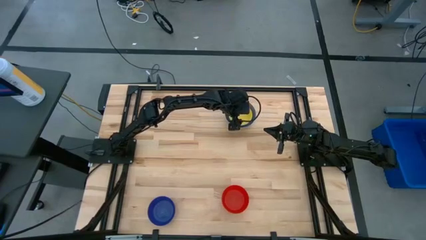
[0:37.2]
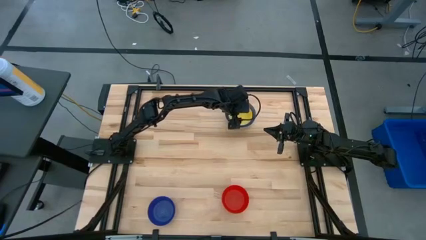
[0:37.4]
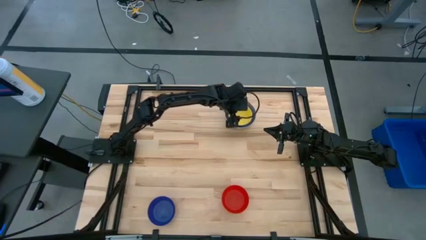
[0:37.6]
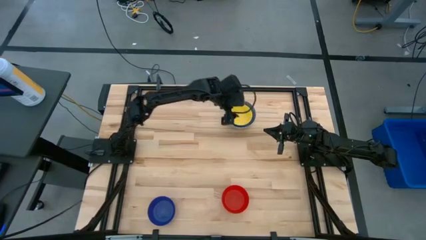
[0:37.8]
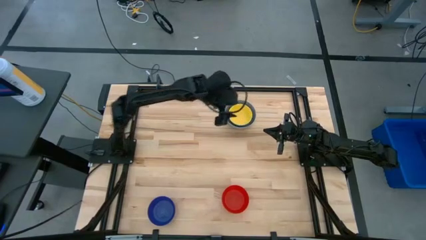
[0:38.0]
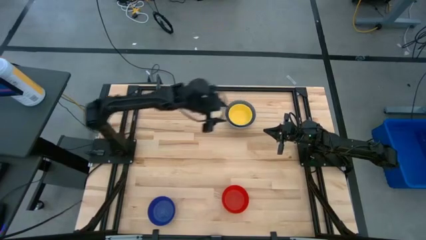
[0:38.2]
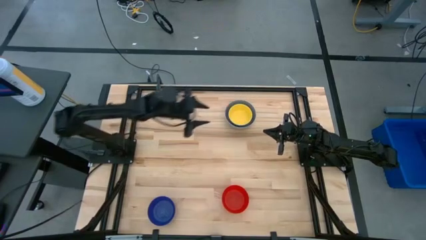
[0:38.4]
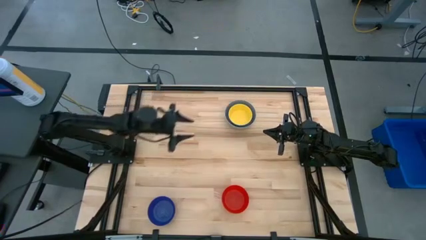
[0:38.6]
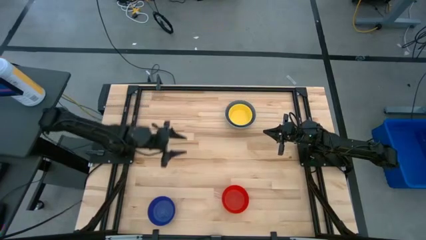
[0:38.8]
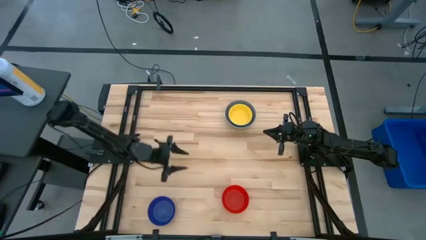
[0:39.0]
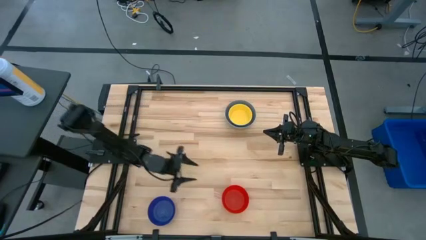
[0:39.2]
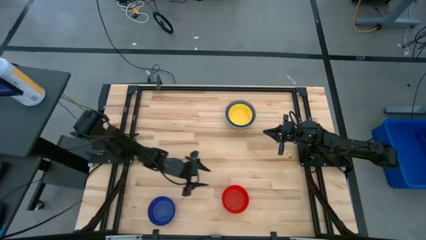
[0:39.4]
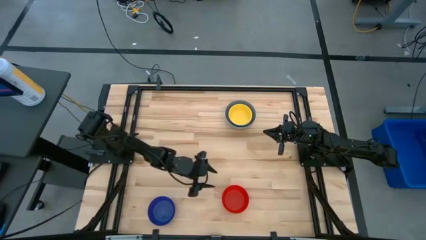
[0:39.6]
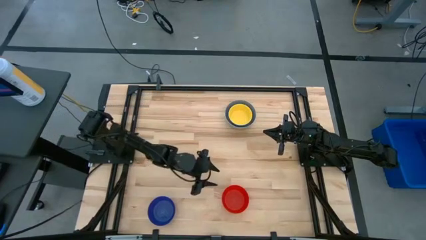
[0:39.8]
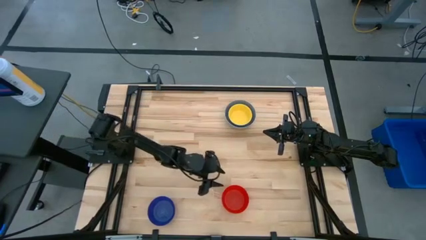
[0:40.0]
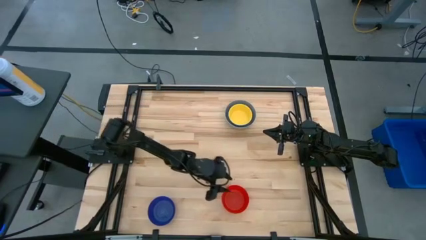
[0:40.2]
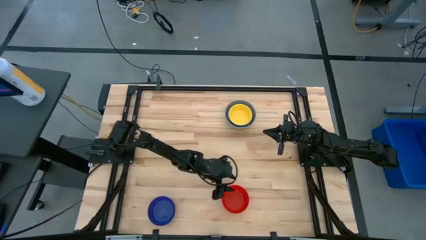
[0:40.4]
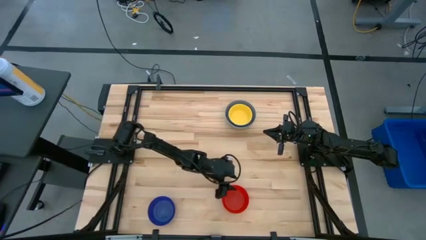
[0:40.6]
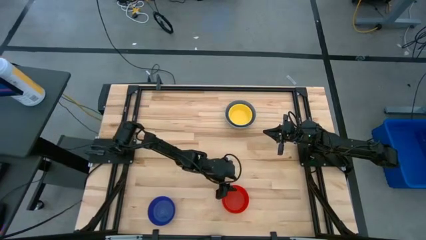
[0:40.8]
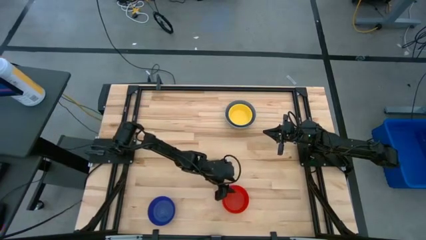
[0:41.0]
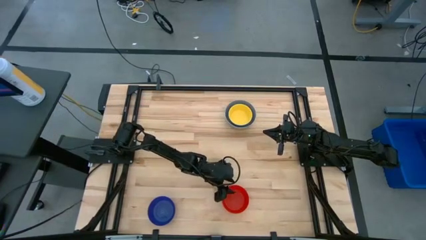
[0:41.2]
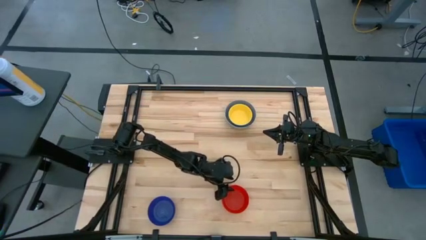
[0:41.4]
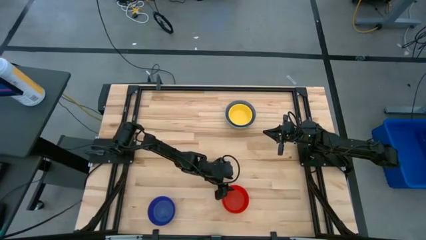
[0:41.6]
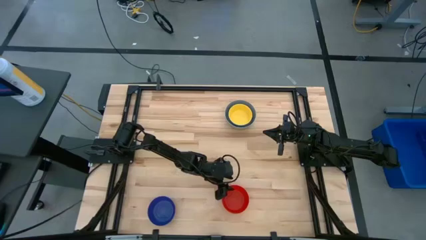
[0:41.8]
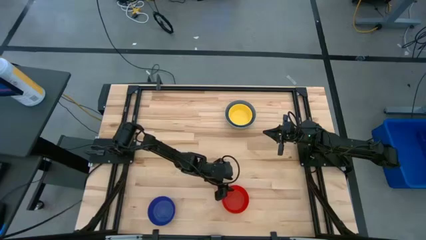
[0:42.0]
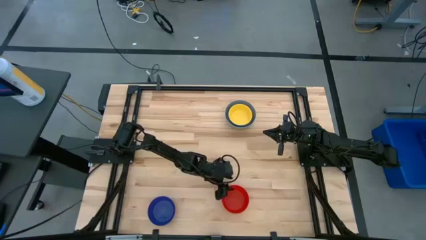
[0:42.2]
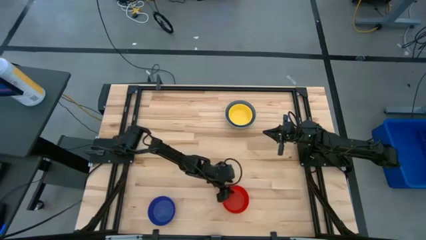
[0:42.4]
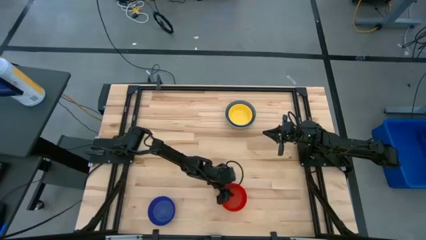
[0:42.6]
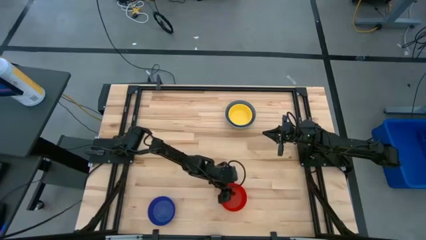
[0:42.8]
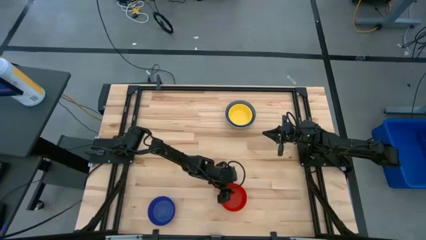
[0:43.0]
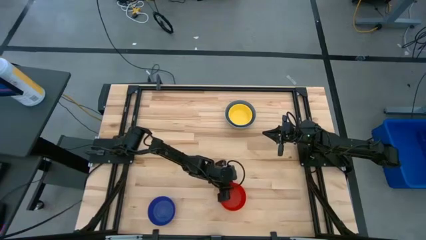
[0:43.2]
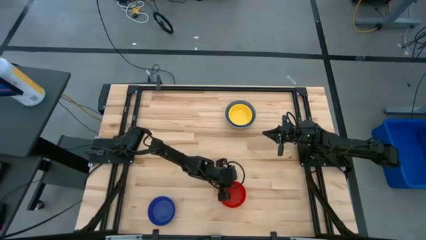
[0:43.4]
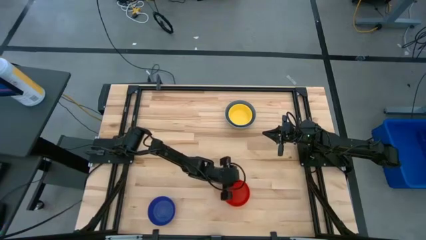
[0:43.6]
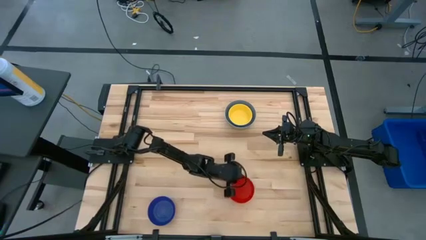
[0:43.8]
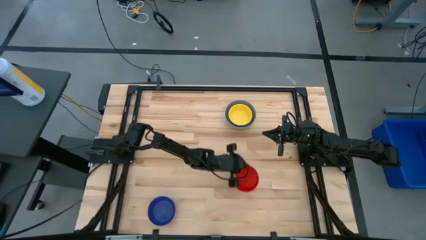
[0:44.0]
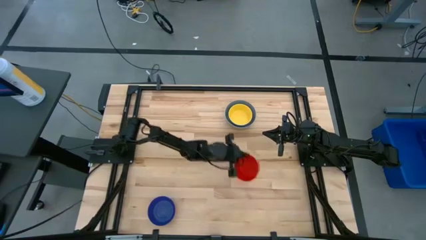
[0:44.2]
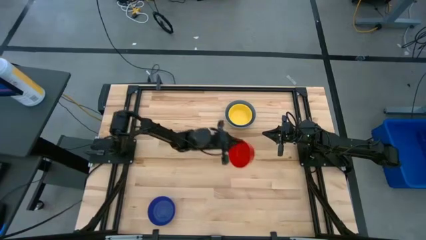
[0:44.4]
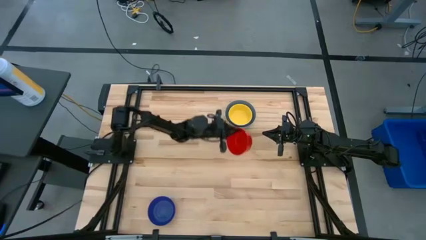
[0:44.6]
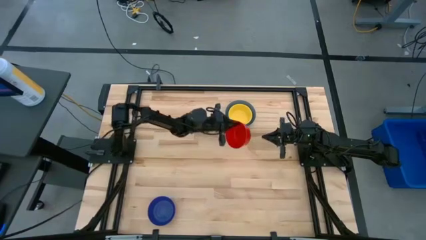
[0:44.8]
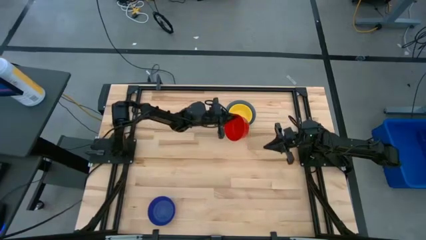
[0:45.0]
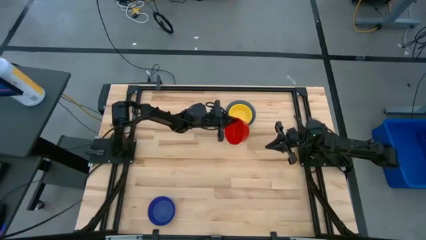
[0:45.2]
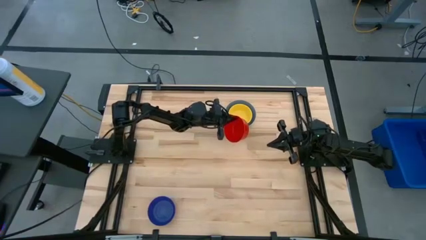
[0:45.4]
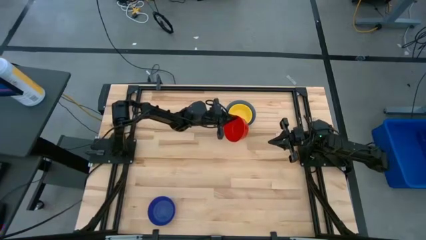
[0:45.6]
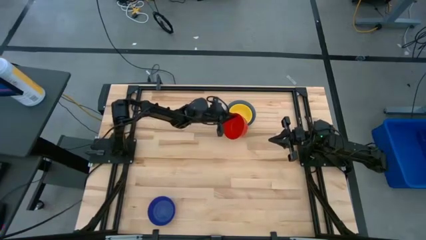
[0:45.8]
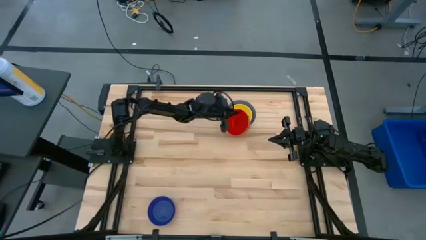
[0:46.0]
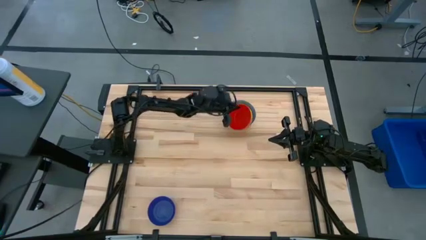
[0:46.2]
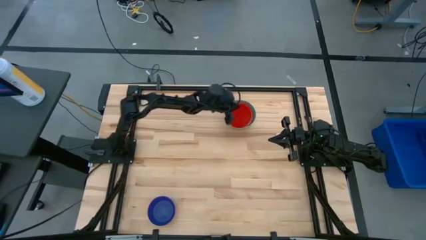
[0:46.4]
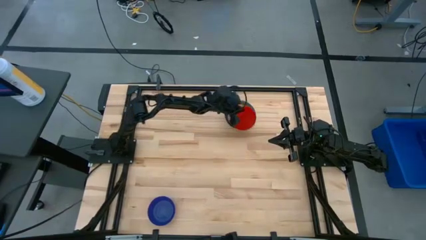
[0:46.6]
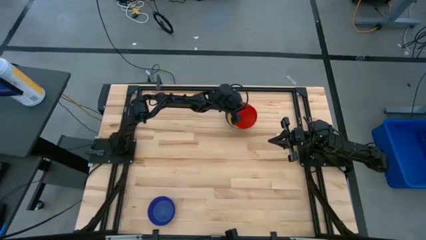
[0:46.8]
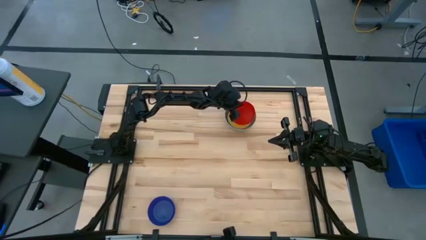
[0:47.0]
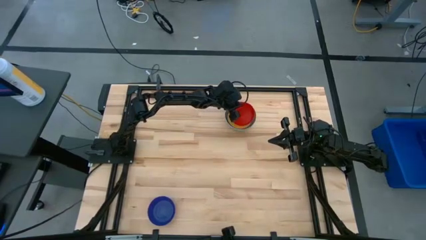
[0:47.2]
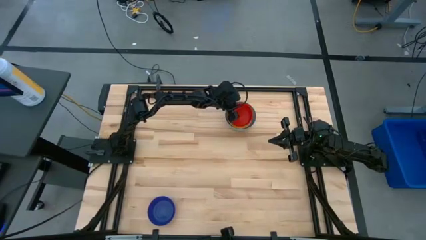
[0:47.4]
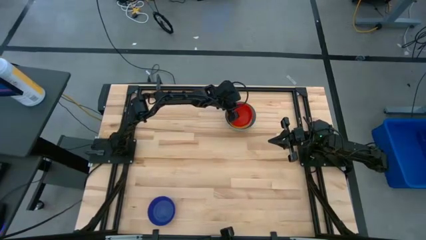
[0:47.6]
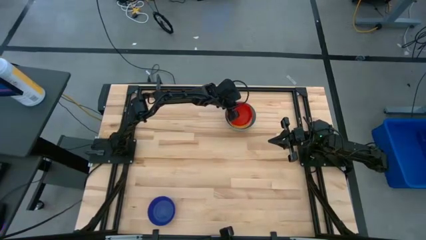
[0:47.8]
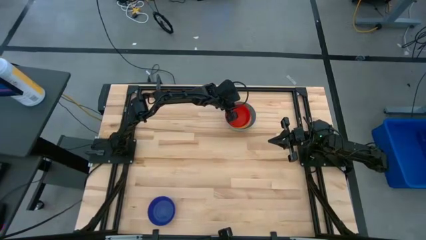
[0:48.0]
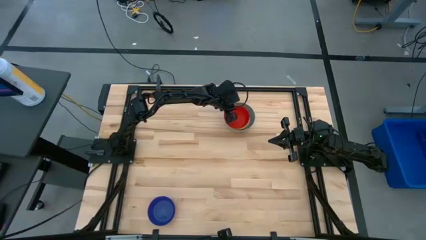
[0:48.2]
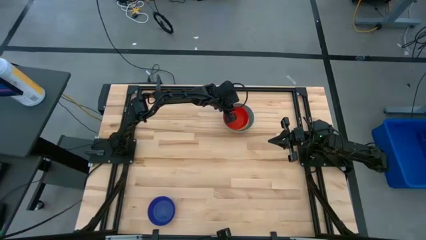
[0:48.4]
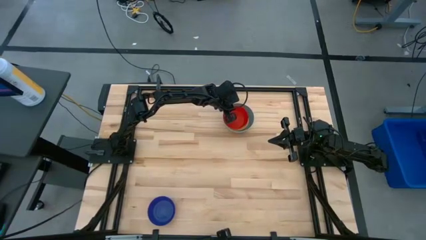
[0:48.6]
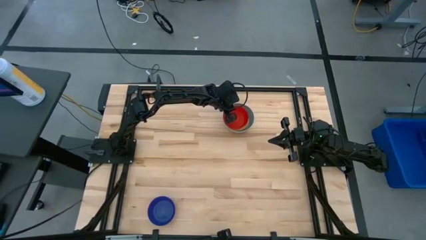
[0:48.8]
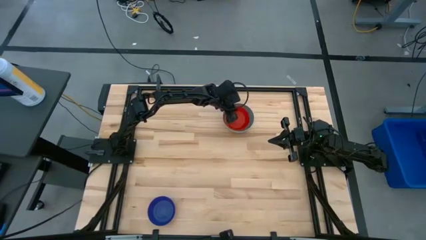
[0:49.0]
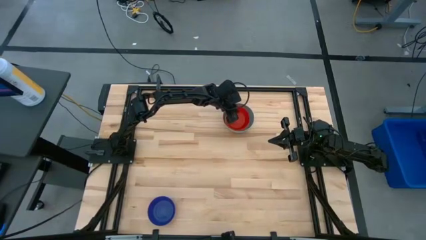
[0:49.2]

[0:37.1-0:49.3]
Stack the red bowl on the yellow bowl
